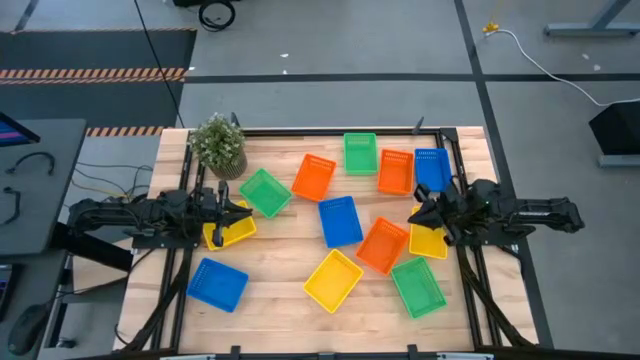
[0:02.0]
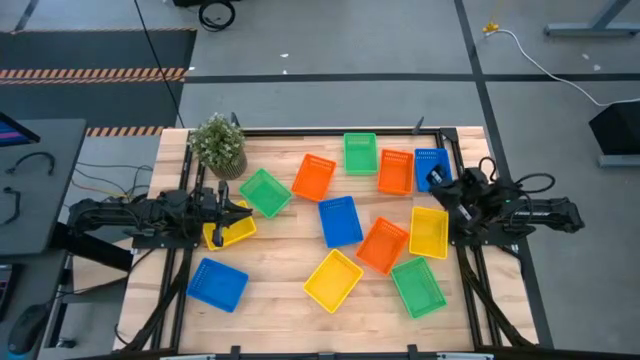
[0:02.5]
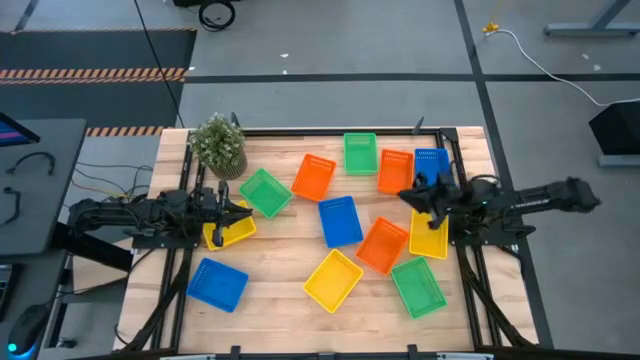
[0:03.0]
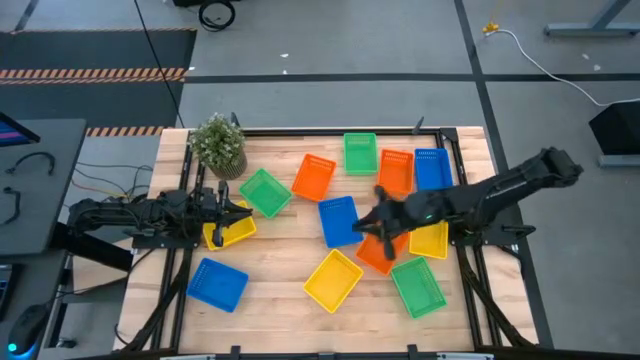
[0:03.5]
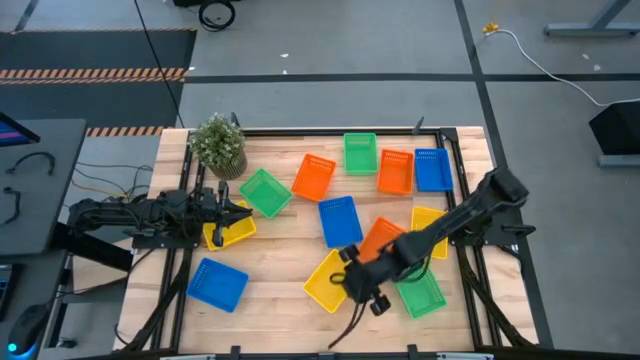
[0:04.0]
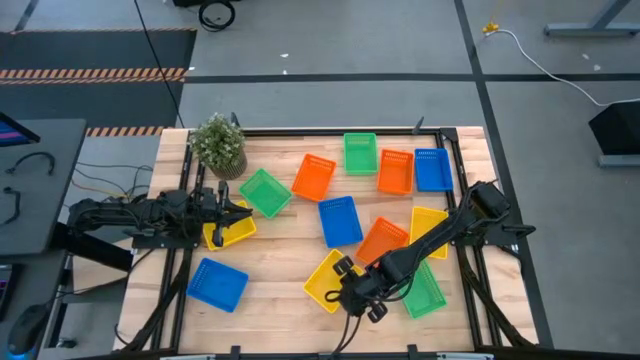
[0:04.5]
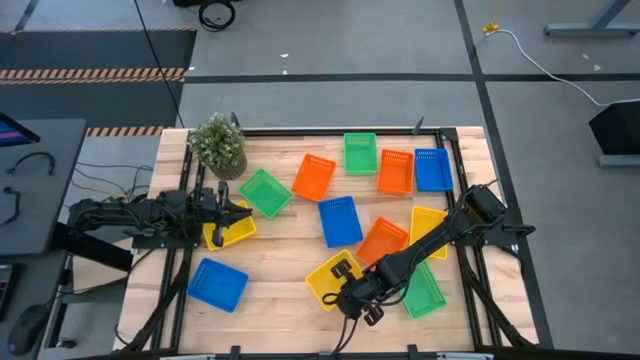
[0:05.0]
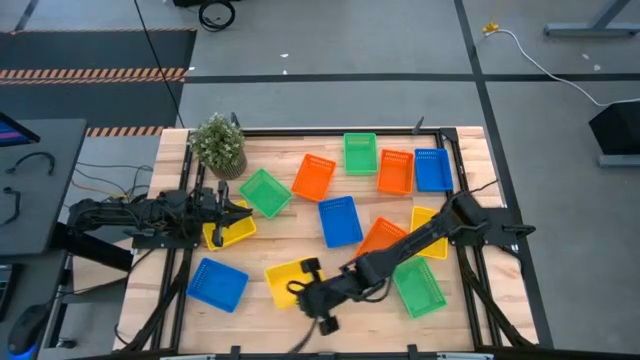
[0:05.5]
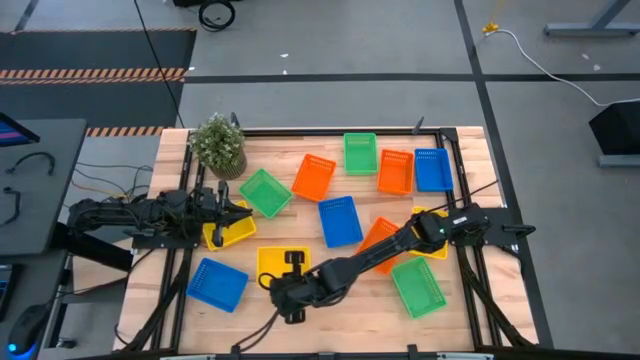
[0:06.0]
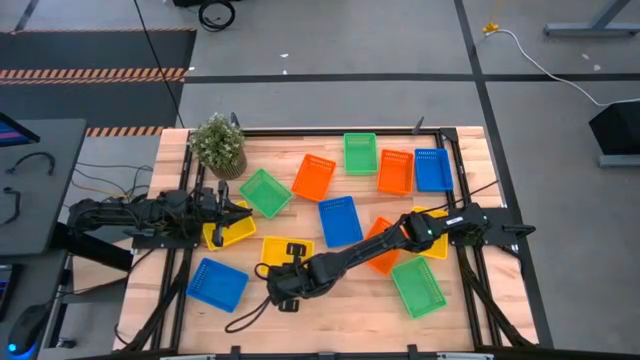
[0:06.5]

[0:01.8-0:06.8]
Move the center yellow bin to the middle left of the table

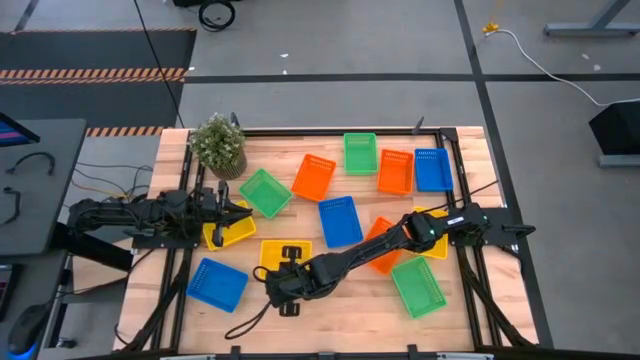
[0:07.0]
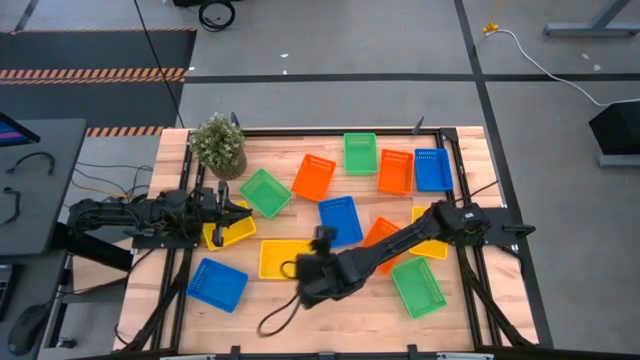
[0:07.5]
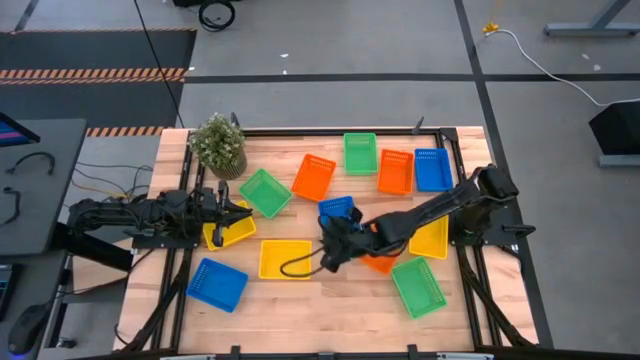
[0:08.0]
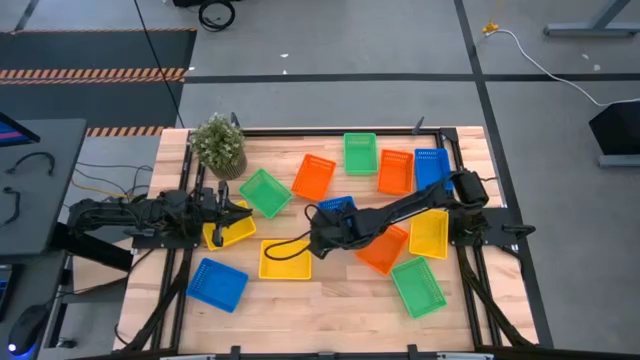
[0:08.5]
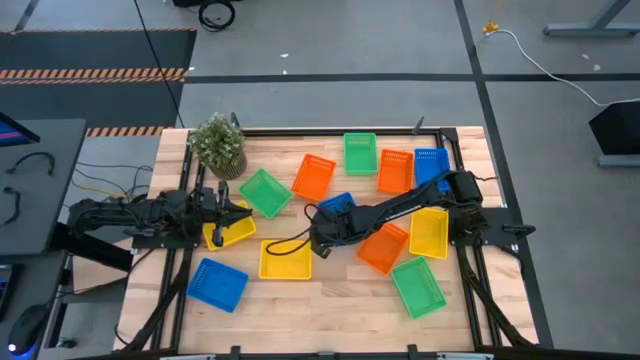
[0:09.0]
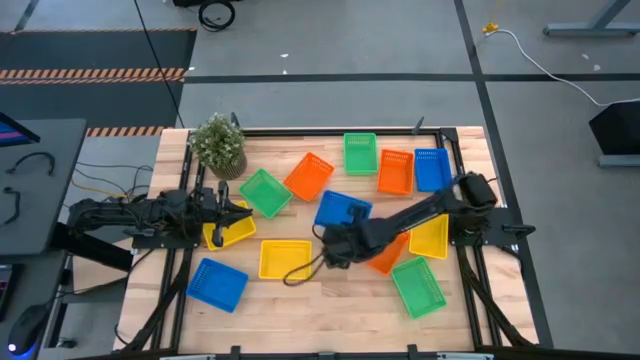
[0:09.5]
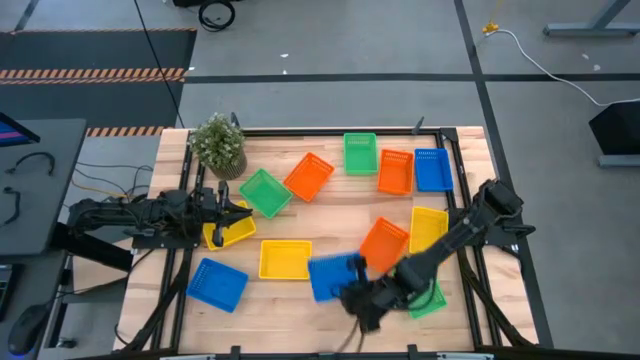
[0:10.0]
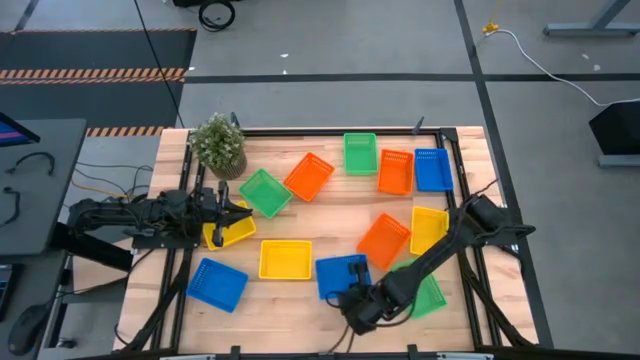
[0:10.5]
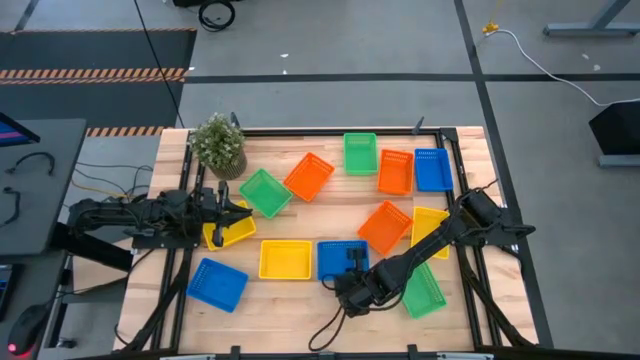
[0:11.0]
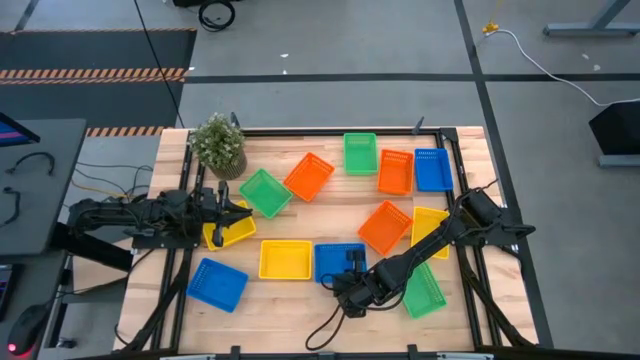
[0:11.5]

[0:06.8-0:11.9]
Move the center blue bin to the right side of the center yellow bin

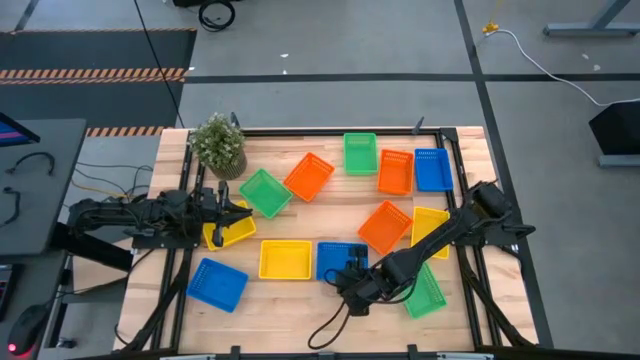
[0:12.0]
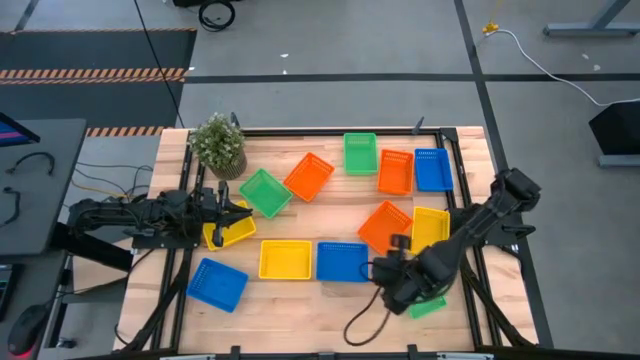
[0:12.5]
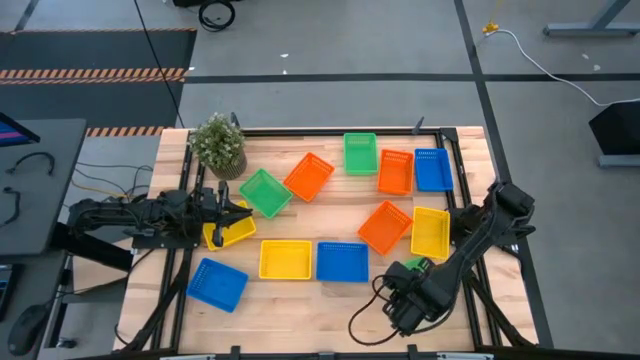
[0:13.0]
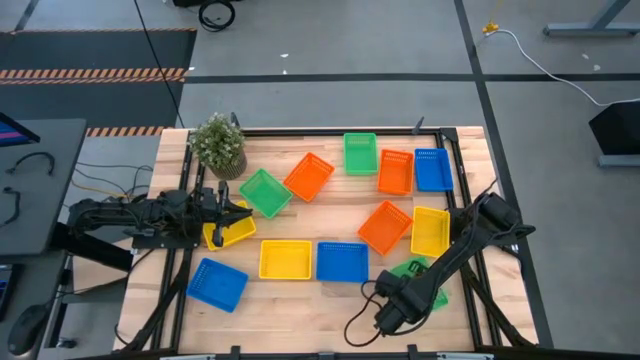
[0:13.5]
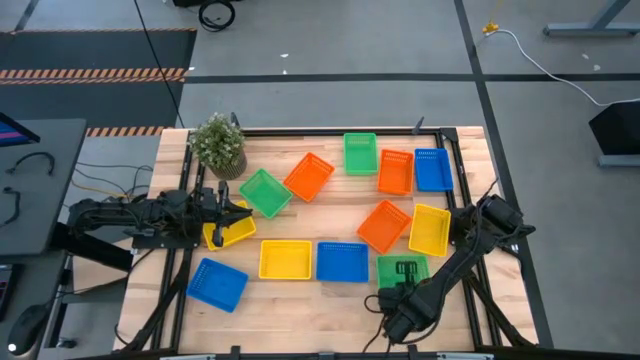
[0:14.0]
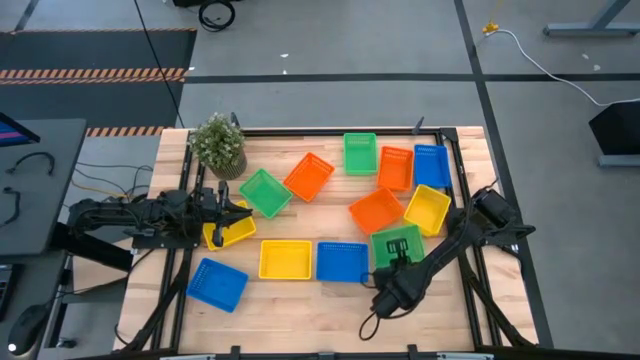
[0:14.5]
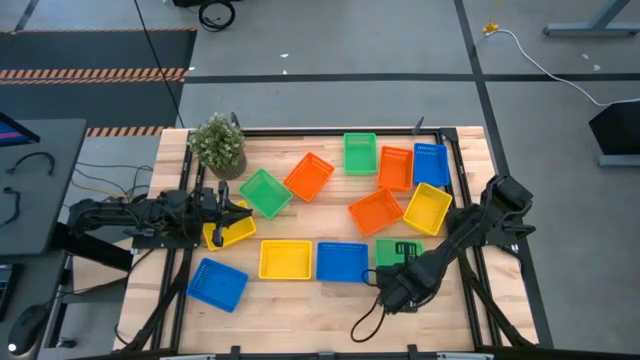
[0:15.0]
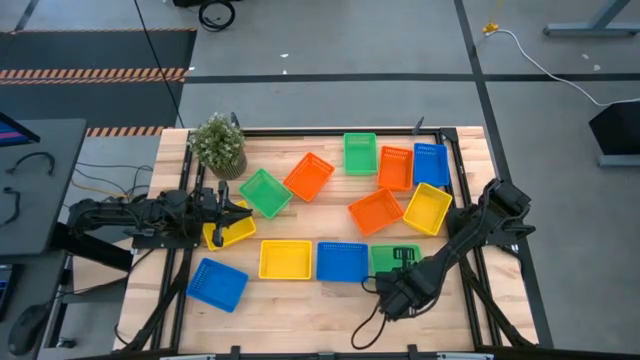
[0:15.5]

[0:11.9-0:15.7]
Move the bottom green bin to the right side of the bottom right blue bin

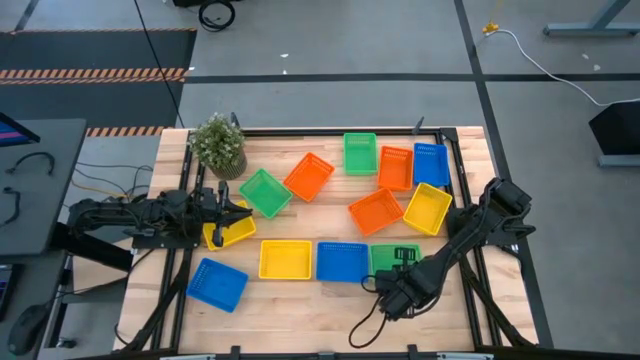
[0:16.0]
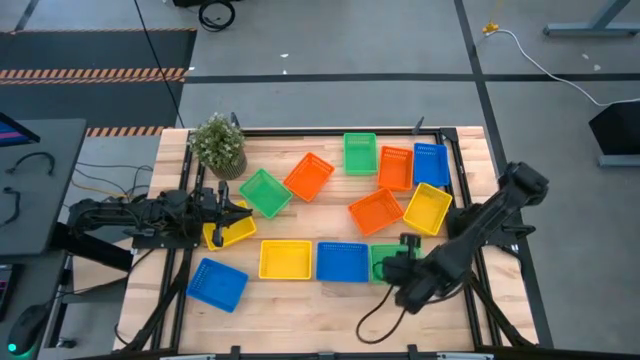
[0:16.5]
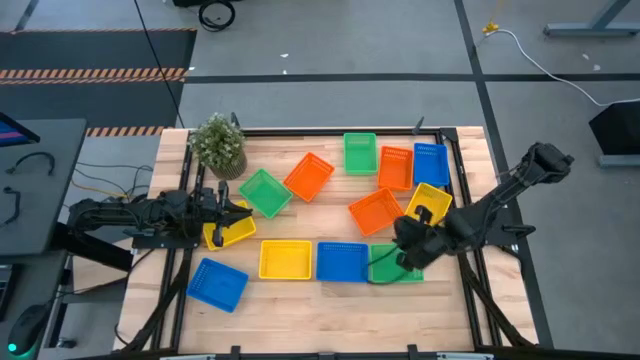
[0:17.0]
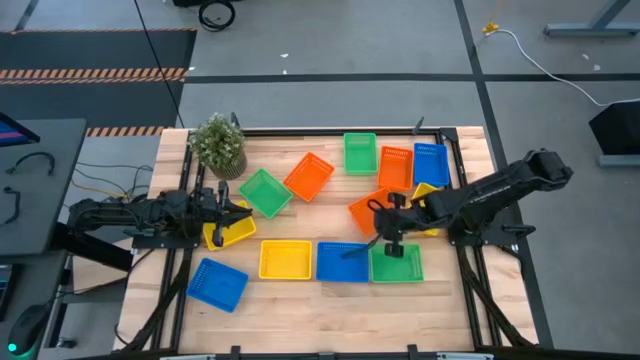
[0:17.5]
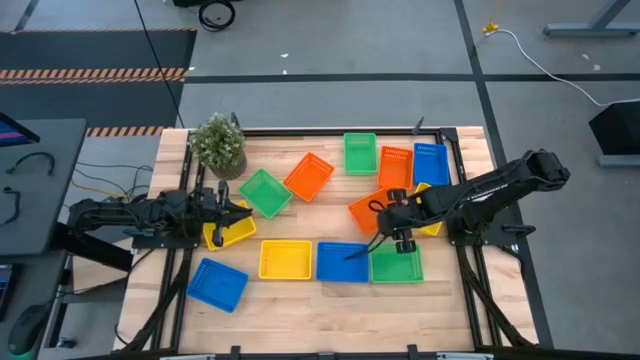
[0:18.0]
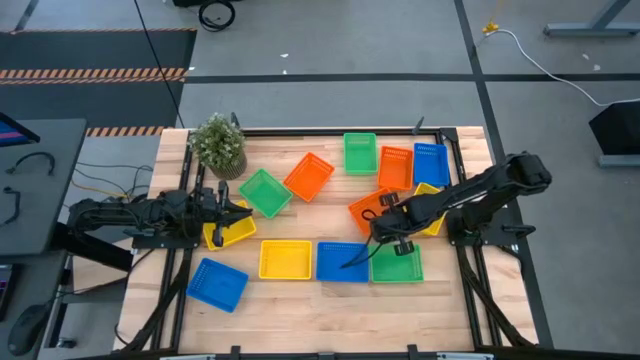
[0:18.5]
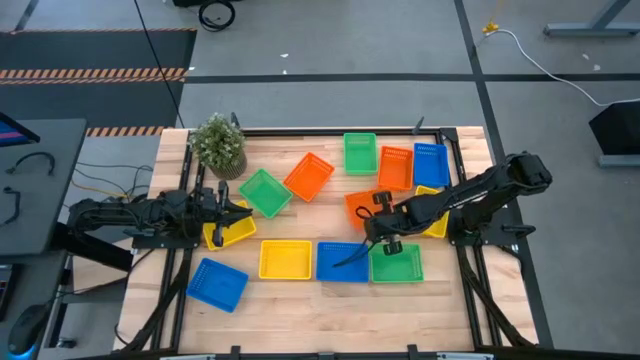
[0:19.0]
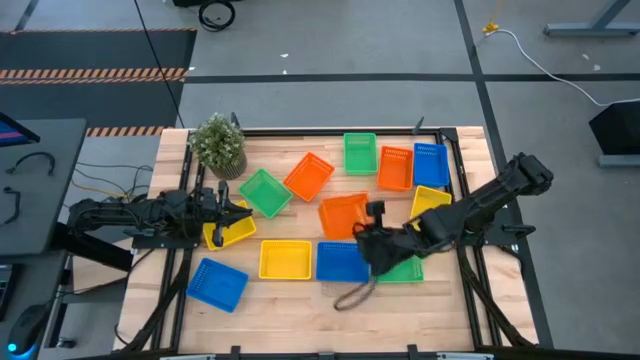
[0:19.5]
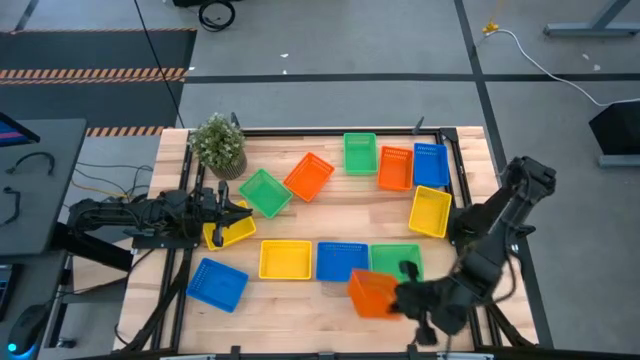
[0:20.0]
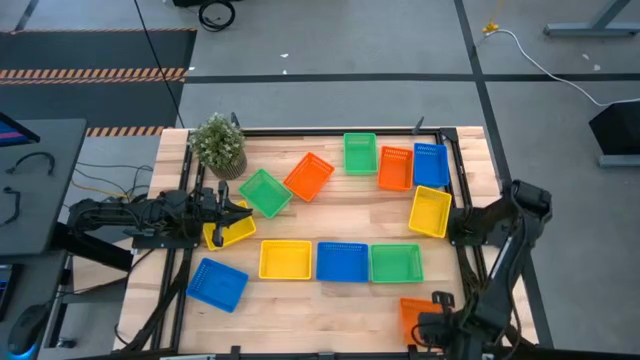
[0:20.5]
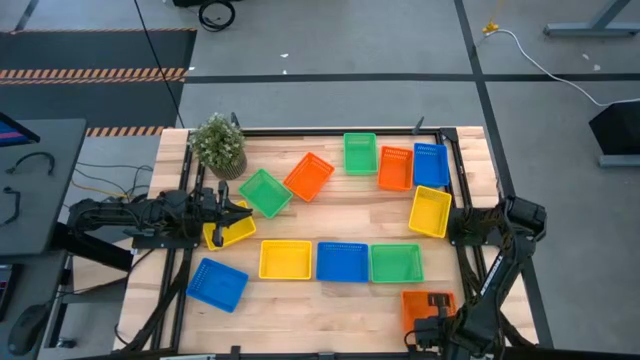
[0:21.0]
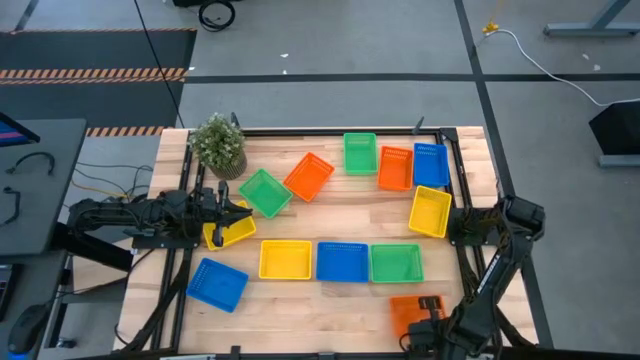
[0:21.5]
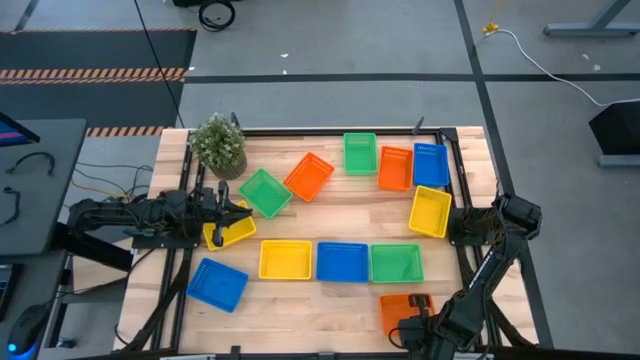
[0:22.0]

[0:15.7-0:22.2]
Move the center orange bin to the bottom right of the table
